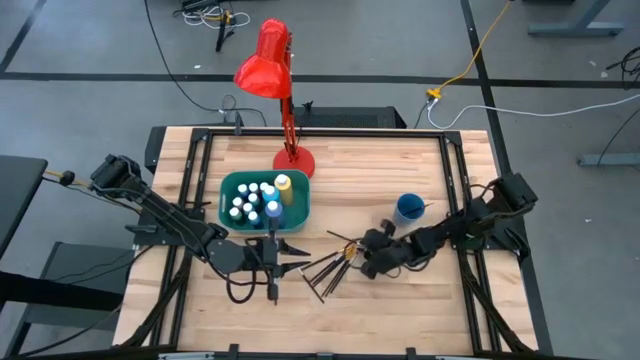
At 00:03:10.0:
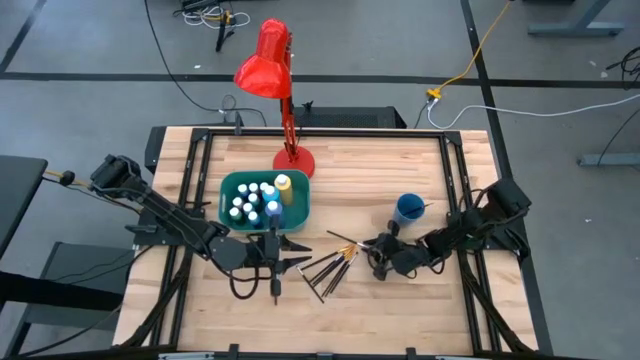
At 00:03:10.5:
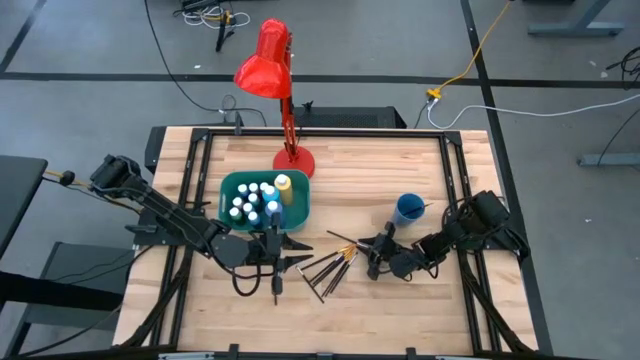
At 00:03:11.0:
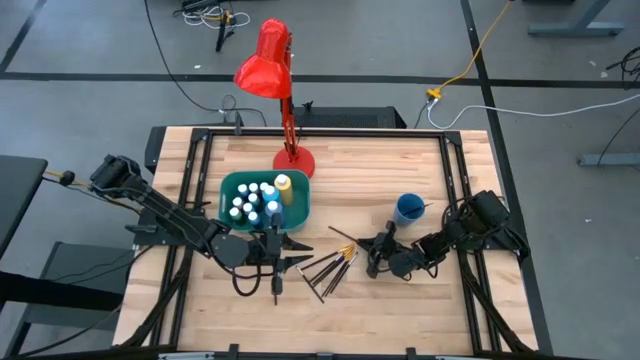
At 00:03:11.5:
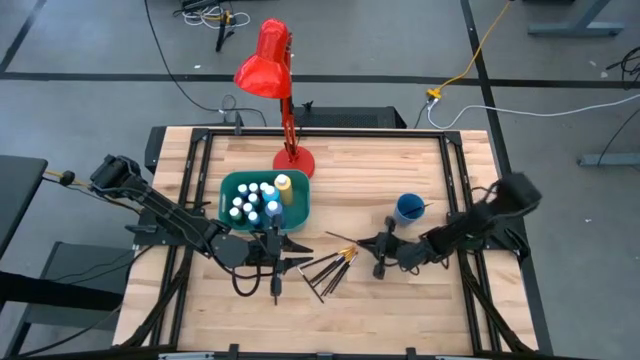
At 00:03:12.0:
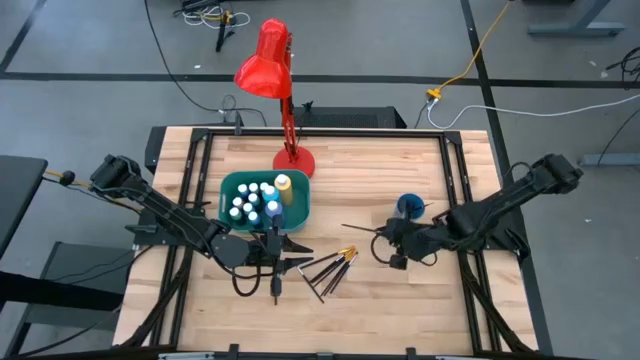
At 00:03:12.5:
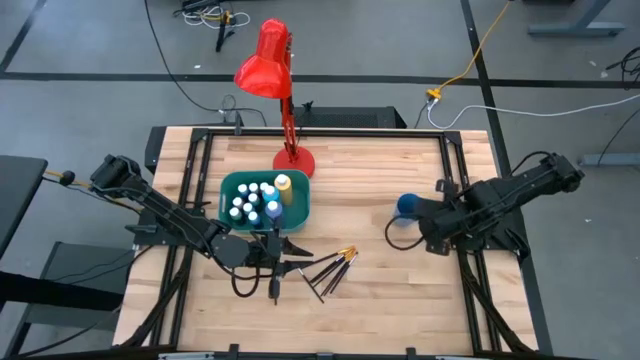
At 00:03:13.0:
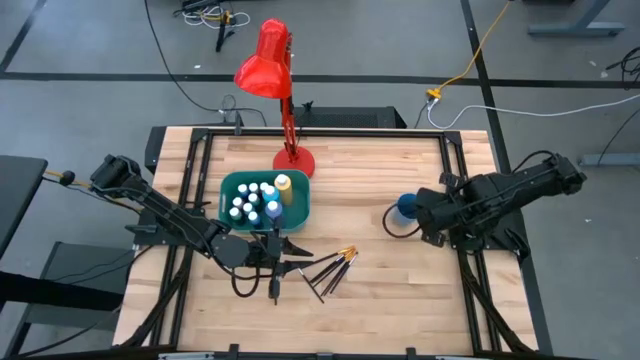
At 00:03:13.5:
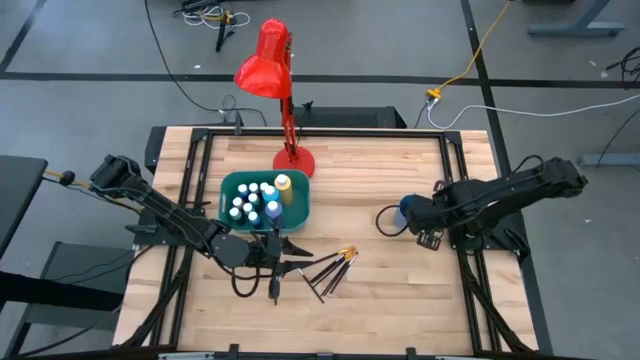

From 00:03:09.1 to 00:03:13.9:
Task: Pick & Place Paint Supplies
Put the black silver paint brush into the blue cup

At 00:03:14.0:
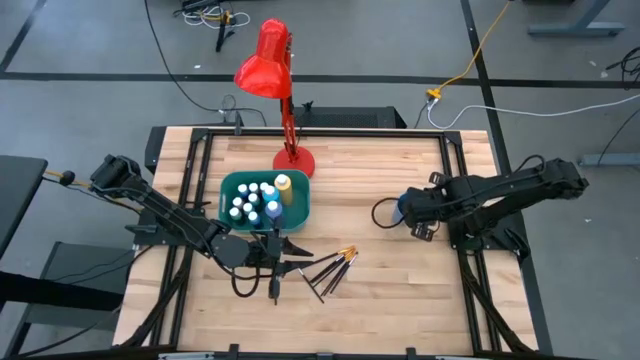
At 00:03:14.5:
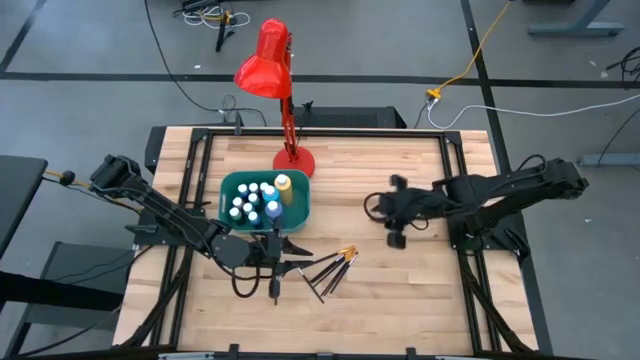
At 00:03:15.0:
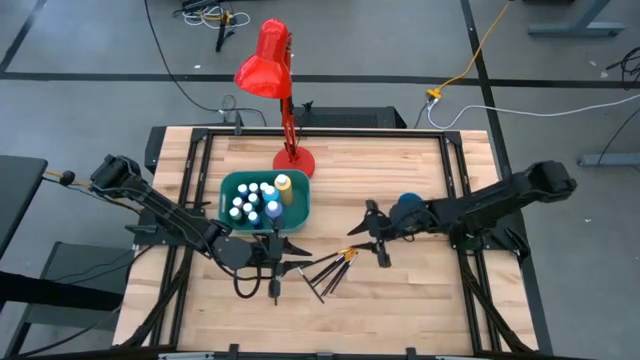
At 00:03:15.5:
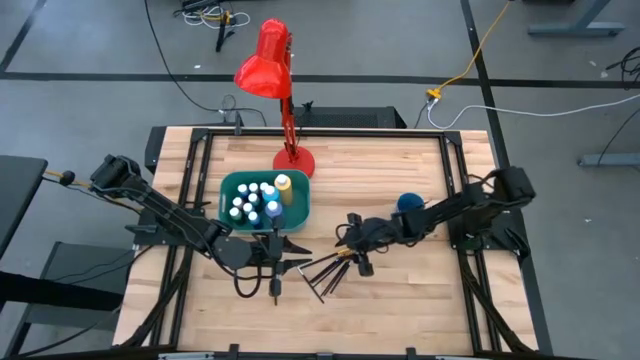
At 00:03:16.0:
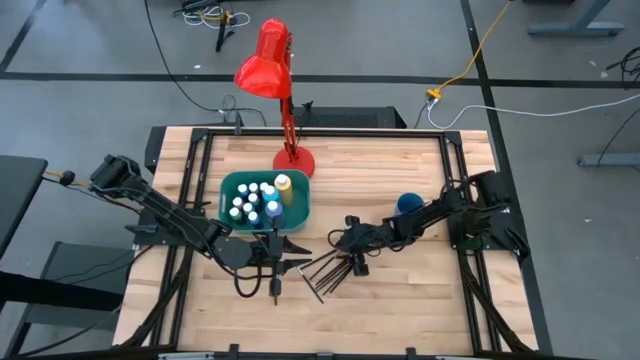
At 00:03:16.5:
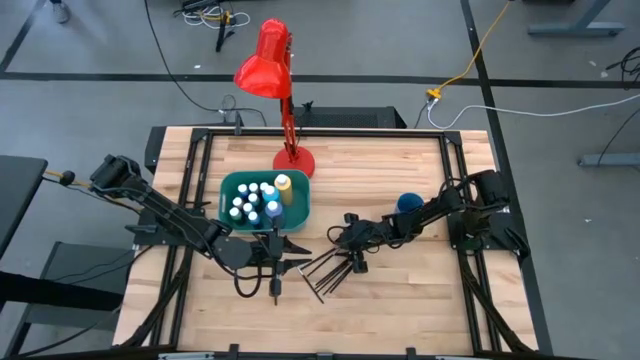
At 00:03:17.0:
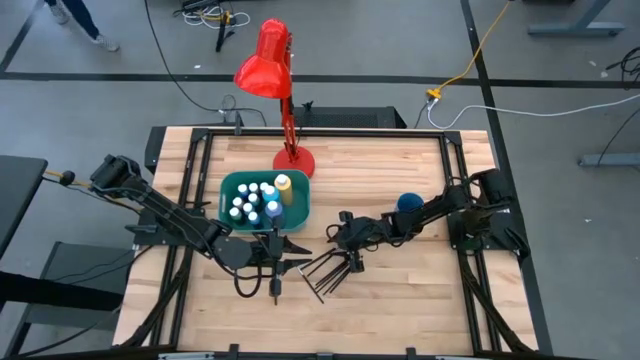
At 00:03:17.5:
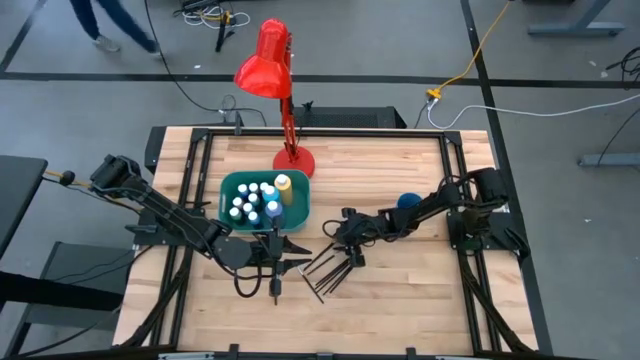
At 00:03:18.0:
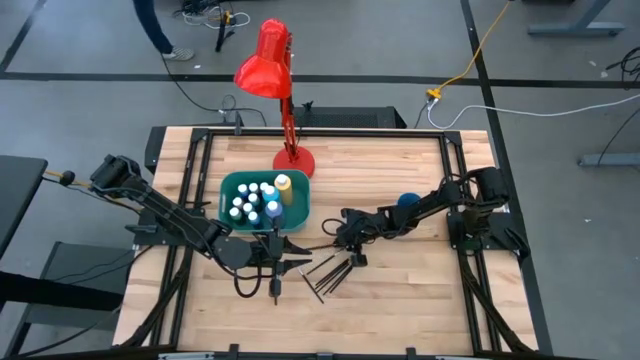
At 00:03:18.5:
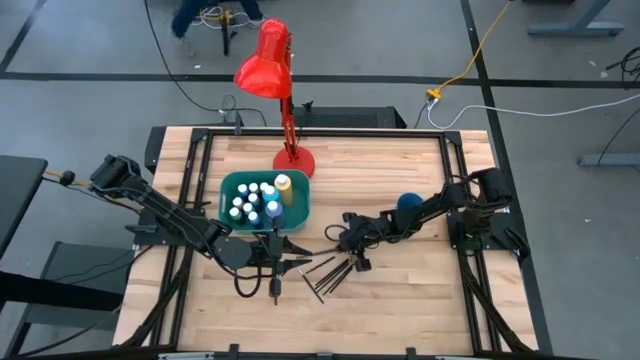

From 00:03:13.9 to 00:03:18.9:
Put the black gold paint brush into the blue cup

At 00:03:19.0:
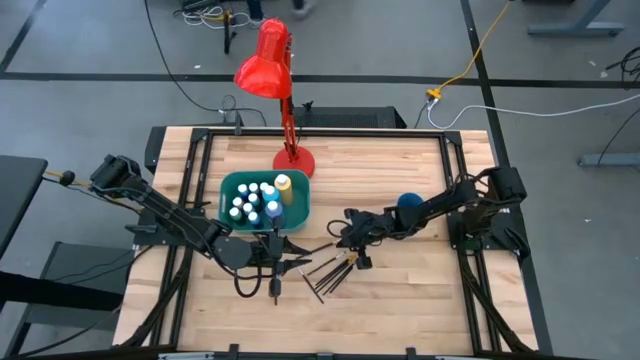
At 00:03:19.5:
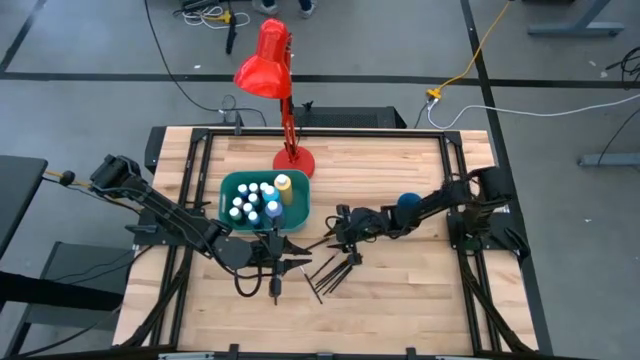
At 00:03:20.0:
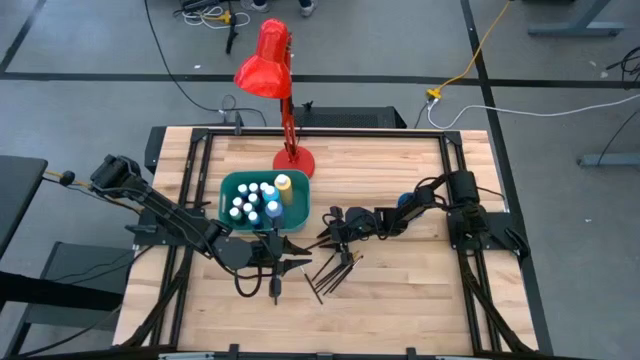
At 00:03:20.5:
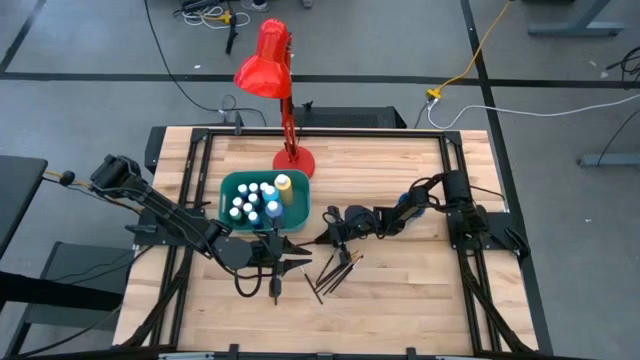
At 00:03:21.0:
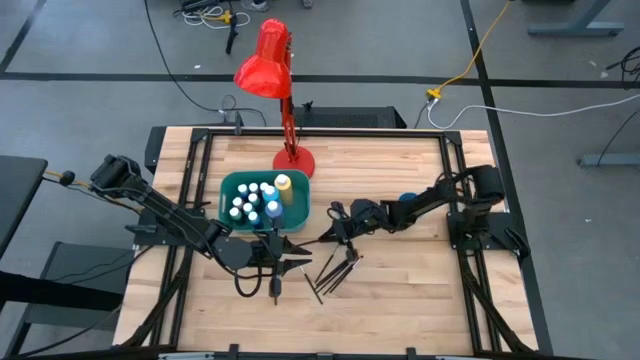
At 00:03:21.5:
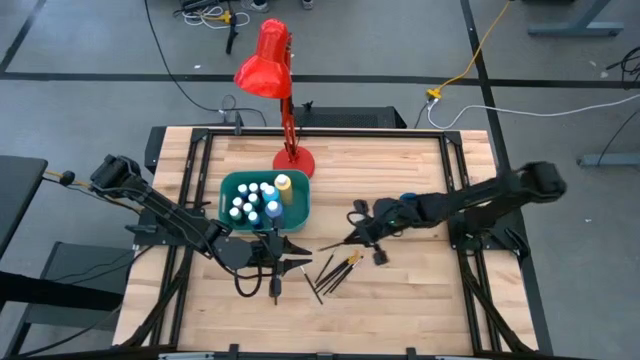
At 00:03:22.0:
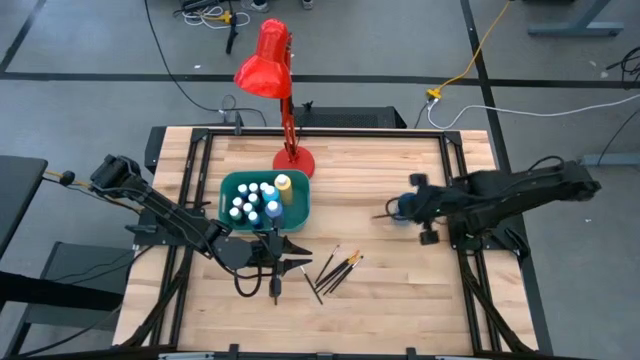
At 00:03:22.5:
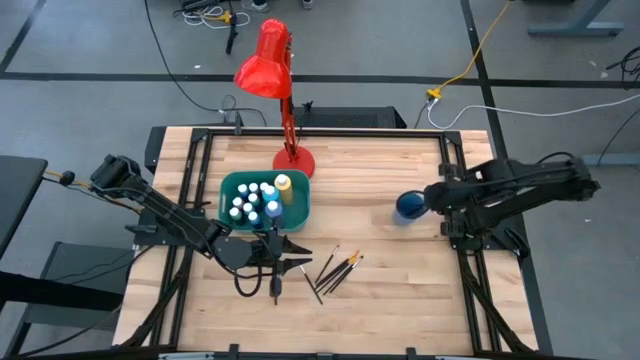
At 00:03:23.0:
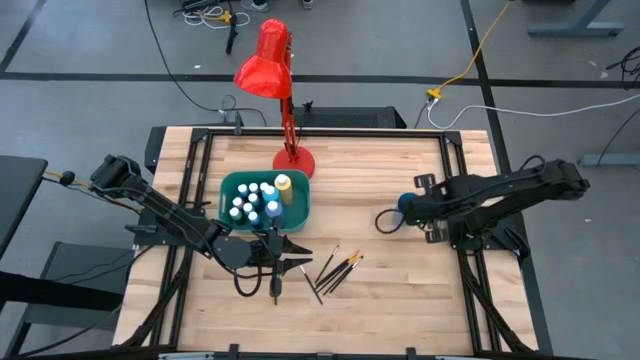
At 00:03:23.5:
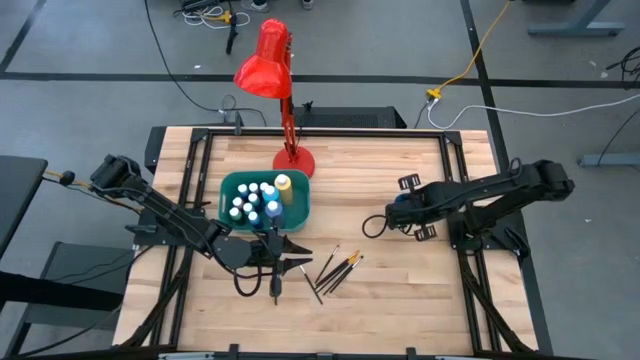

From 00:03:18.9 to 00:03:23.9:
Put the black gold paint brush into the blue cup

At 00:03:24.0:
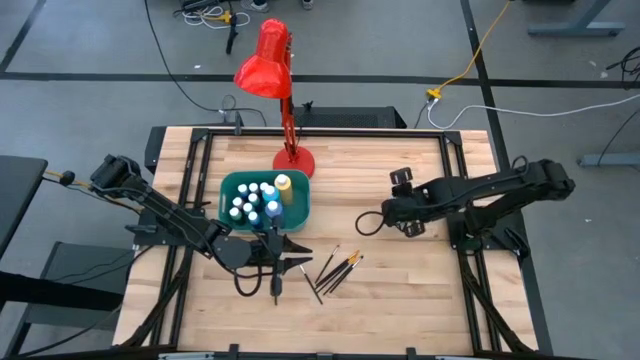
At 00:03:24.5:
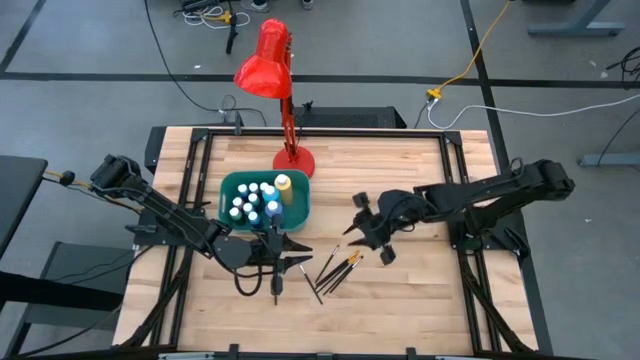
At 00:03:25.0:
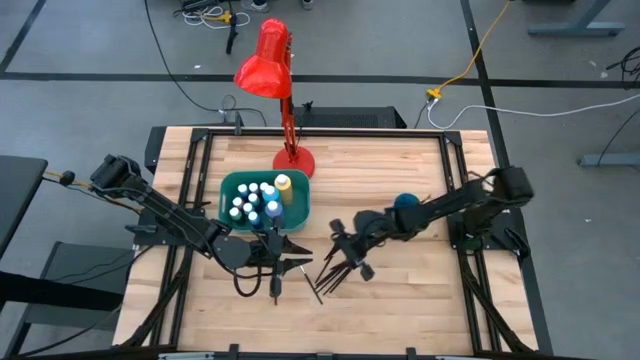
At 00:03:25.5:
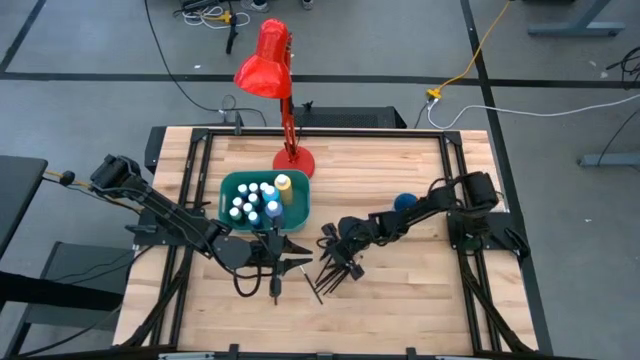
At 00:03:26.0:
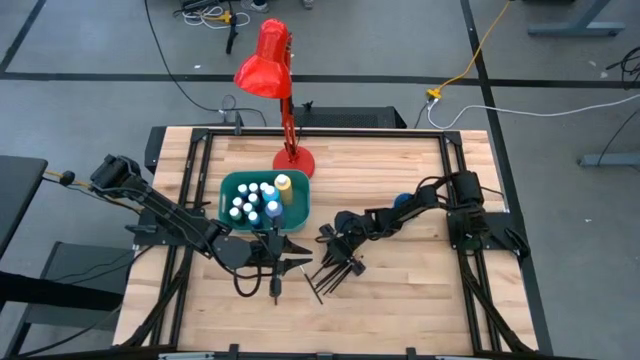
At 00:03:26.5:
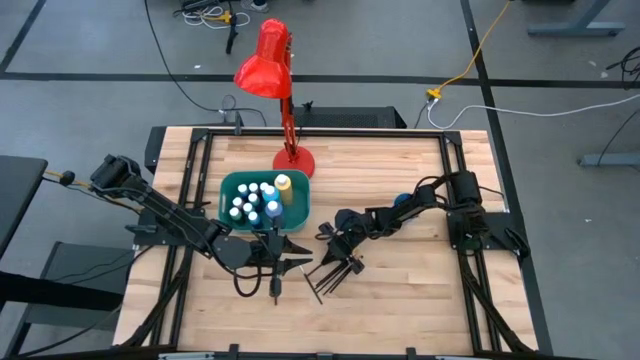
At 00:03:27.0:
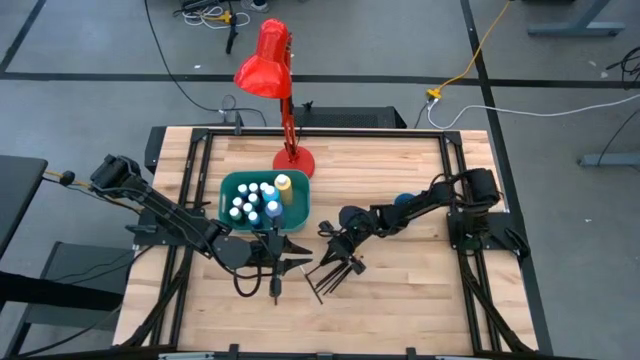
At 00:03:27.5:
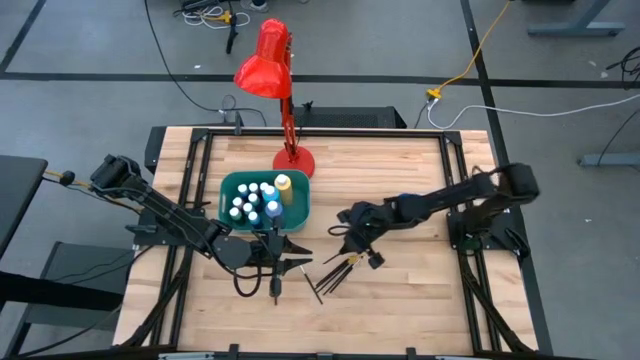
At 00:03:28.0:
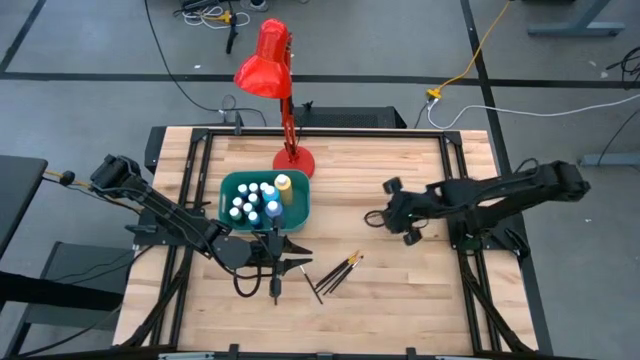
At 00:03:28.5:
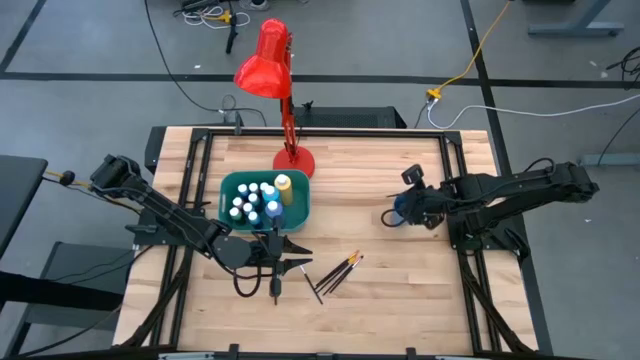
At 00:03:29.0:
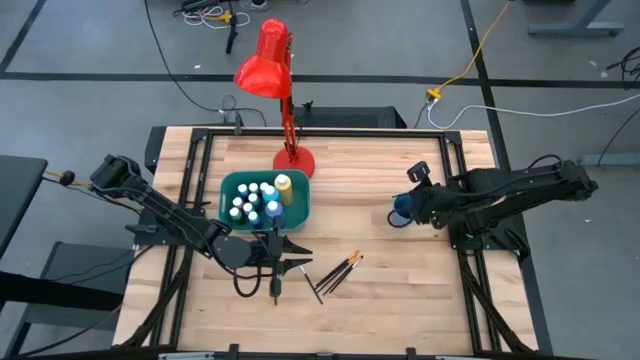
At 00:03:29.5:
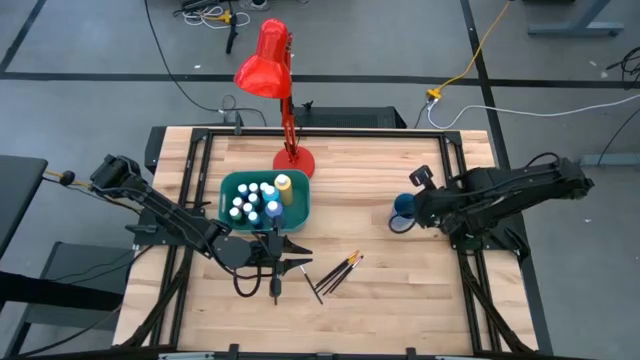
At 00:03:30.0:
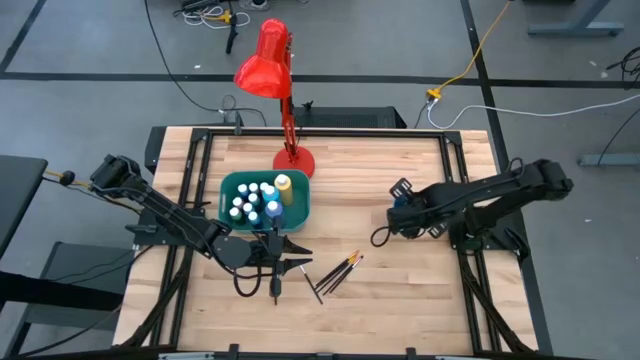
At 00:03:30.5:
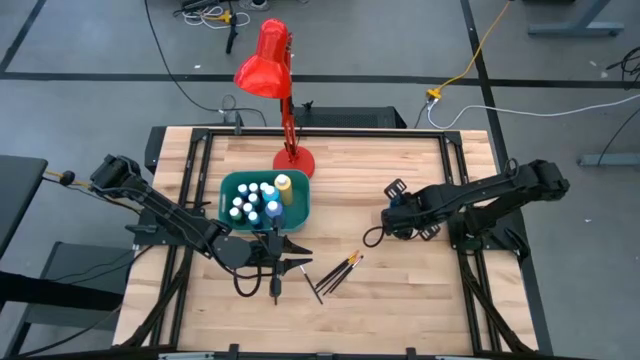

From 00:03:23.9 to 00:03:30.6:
Put the black silver paint brush into the blue cup
